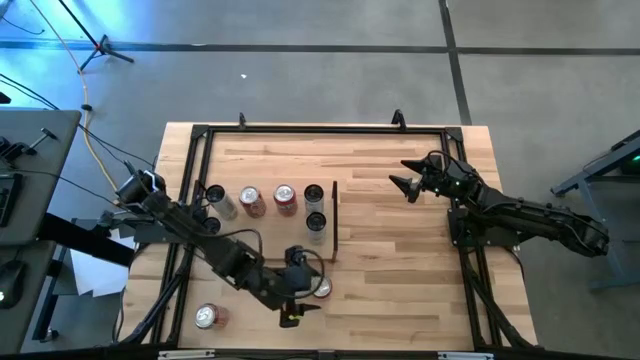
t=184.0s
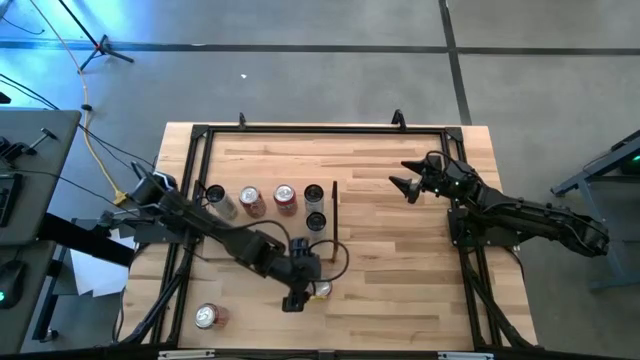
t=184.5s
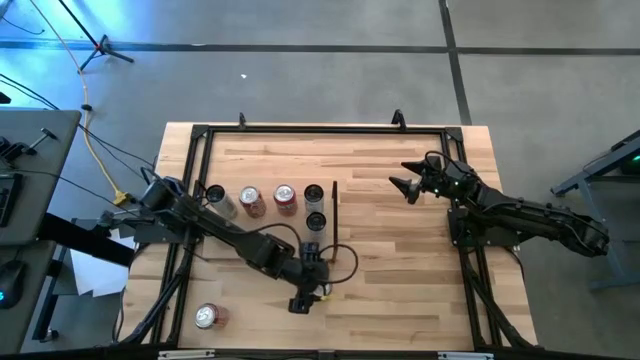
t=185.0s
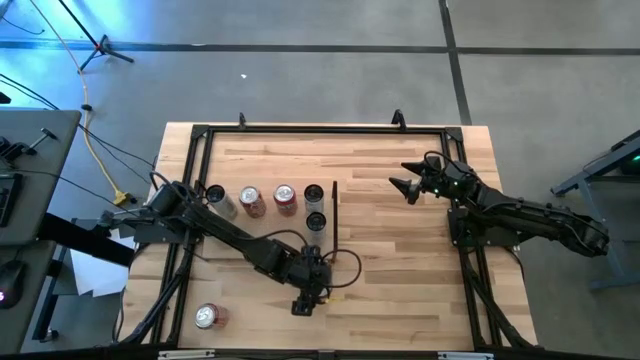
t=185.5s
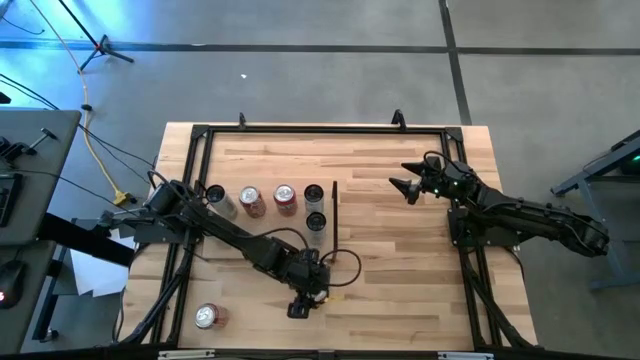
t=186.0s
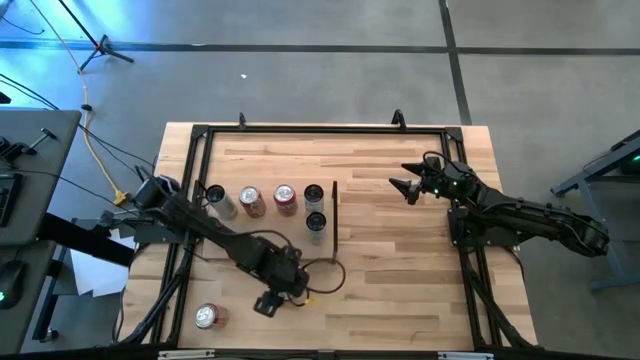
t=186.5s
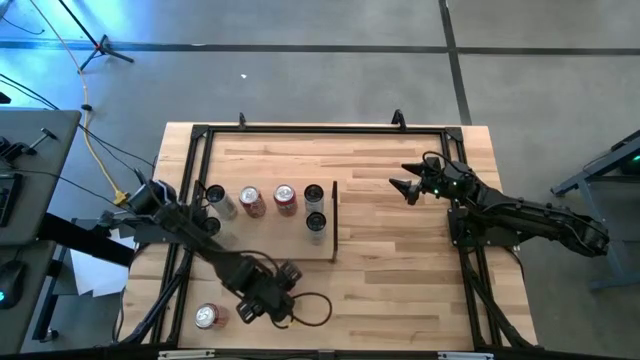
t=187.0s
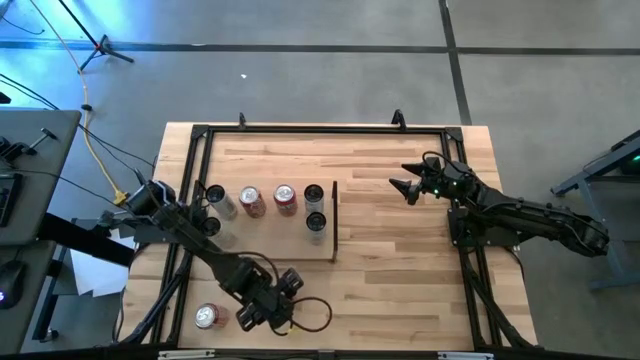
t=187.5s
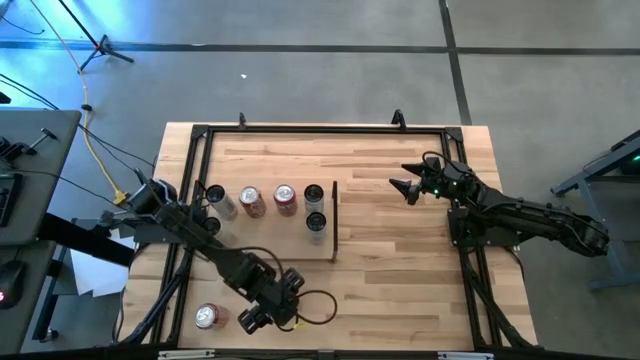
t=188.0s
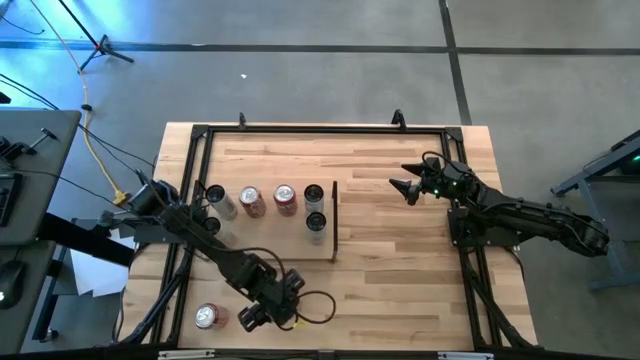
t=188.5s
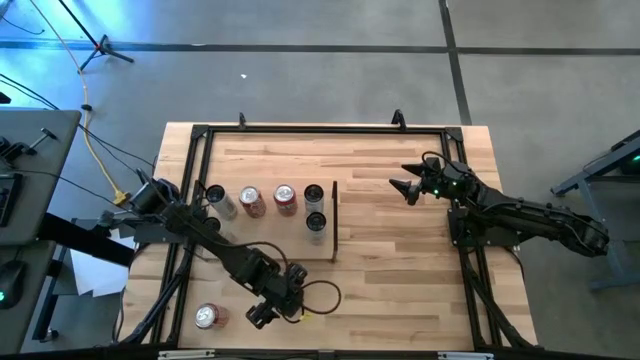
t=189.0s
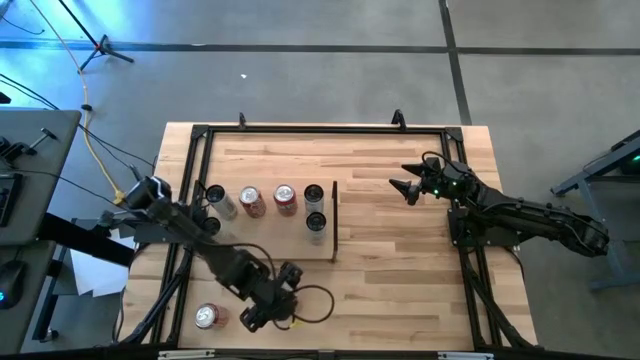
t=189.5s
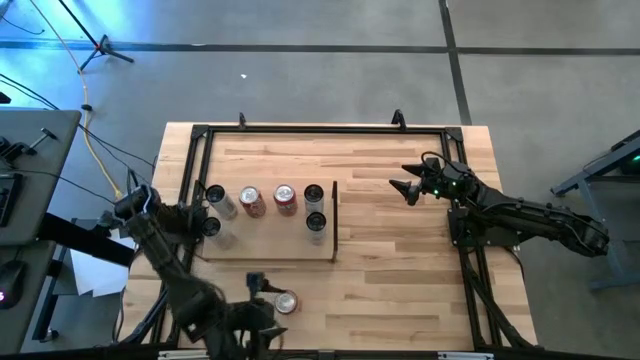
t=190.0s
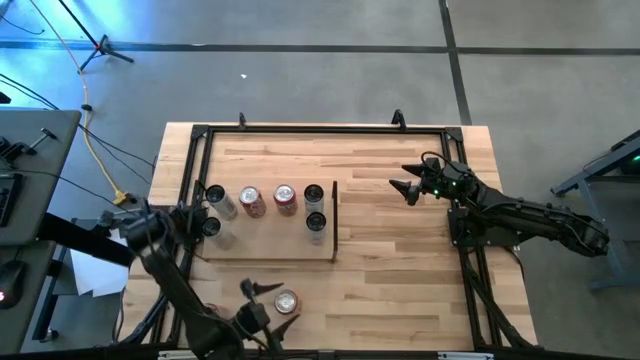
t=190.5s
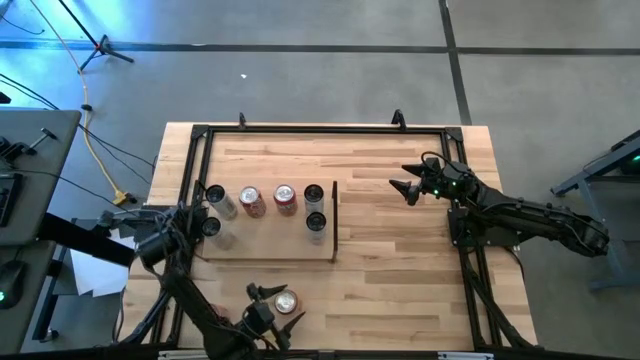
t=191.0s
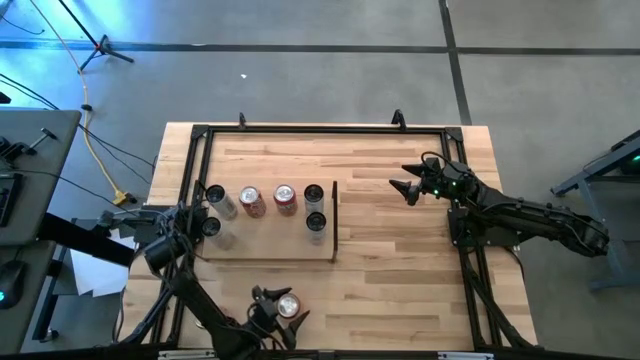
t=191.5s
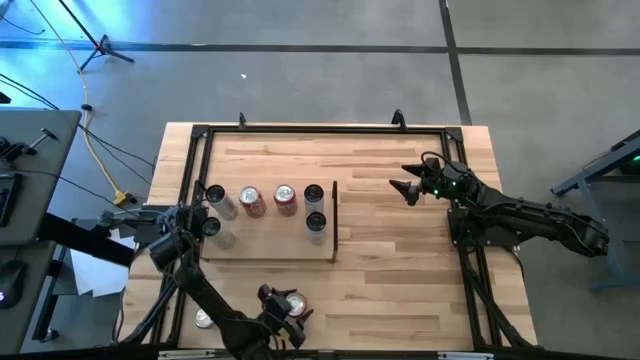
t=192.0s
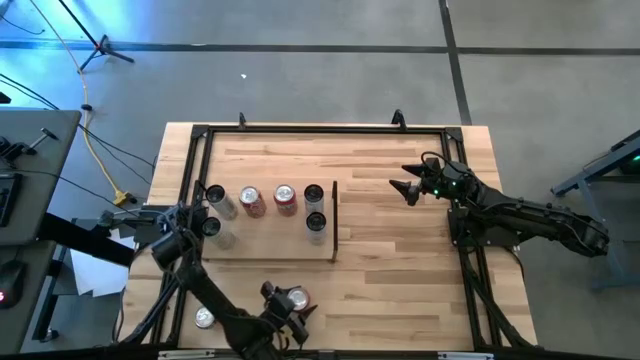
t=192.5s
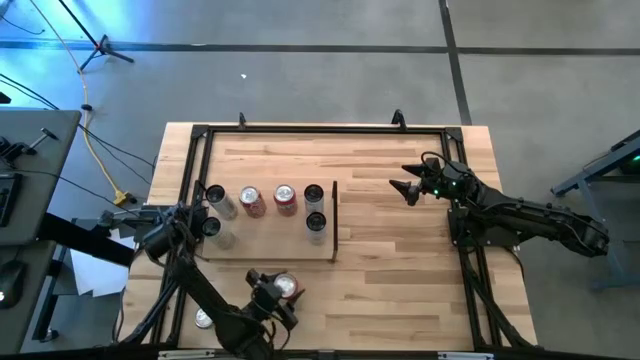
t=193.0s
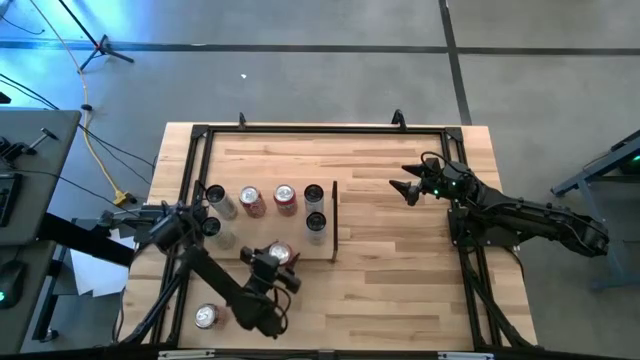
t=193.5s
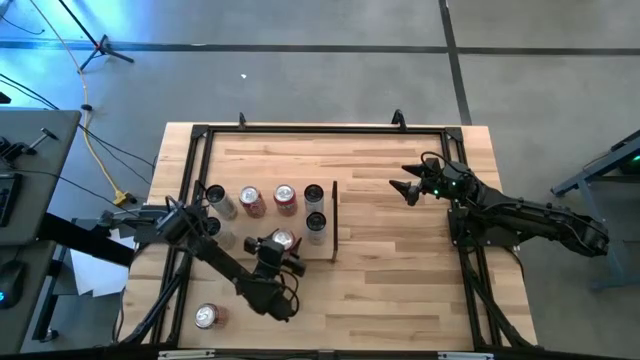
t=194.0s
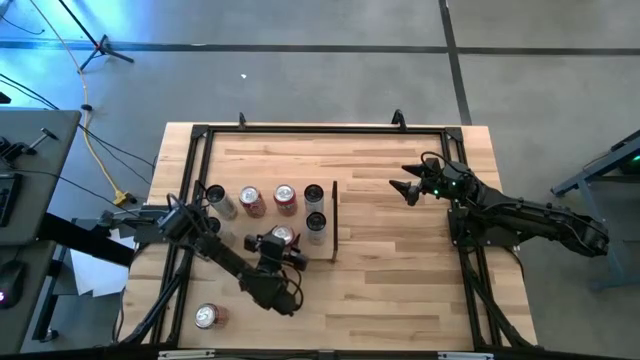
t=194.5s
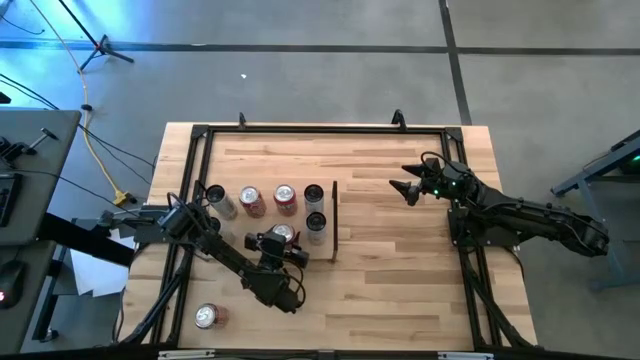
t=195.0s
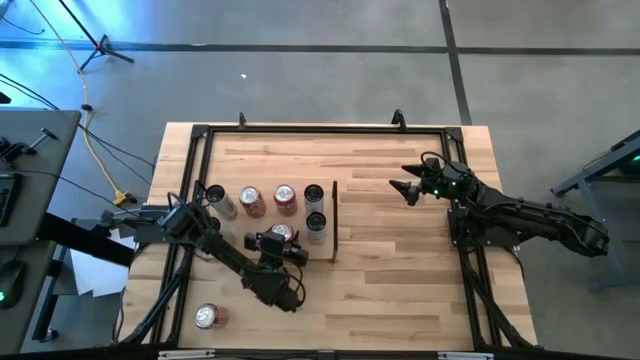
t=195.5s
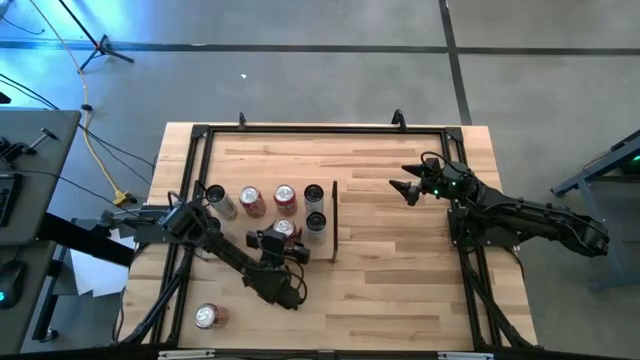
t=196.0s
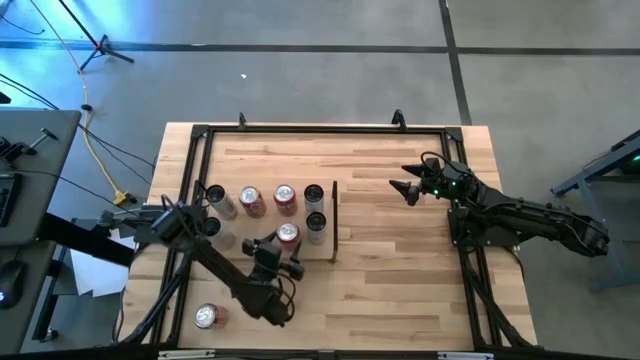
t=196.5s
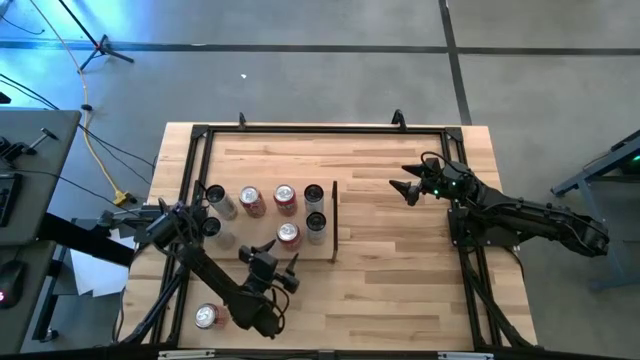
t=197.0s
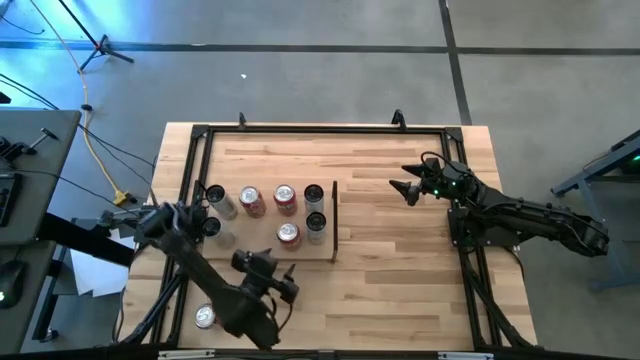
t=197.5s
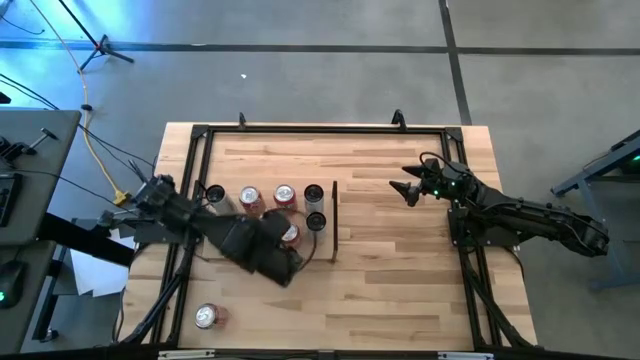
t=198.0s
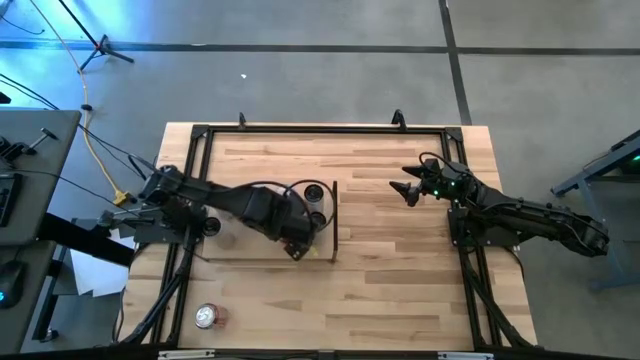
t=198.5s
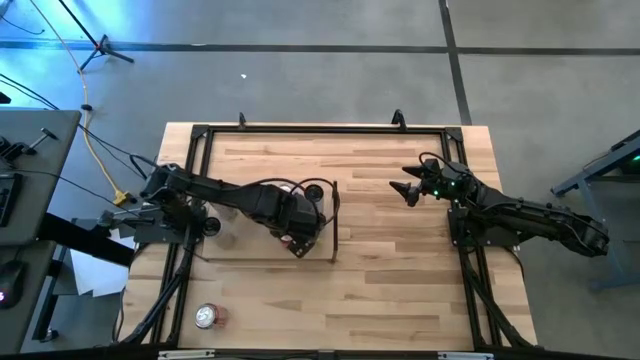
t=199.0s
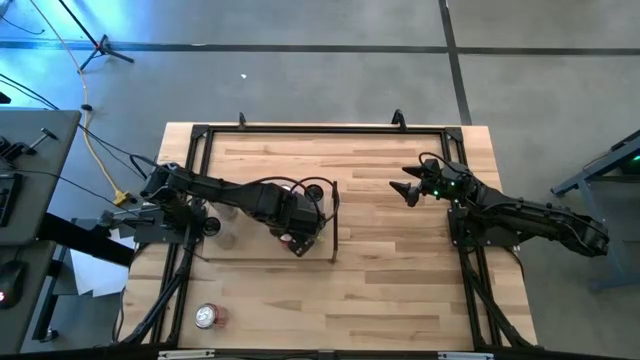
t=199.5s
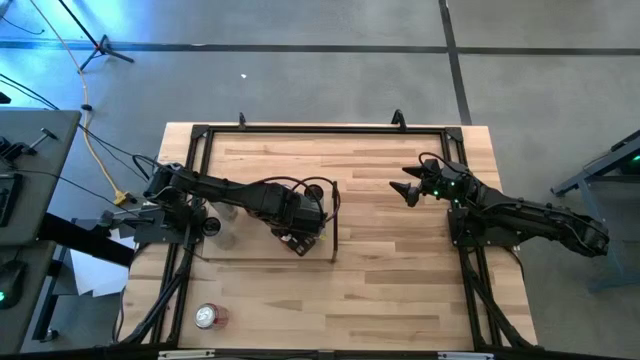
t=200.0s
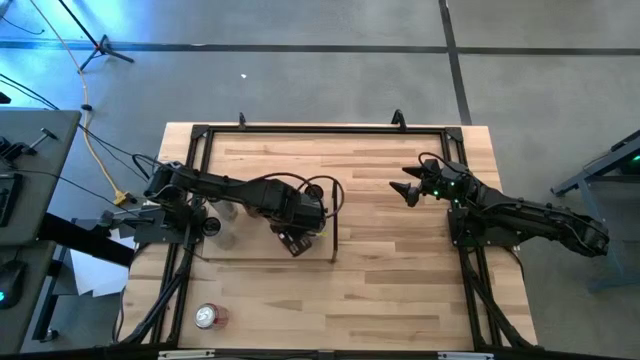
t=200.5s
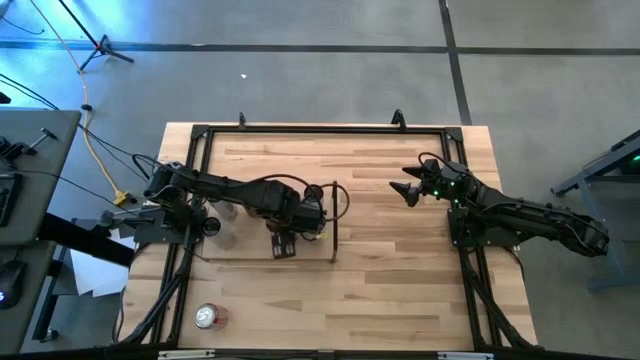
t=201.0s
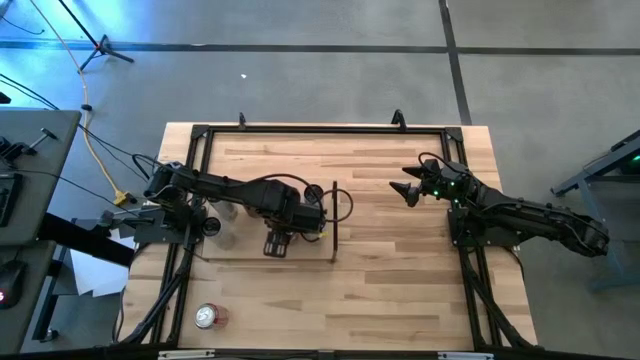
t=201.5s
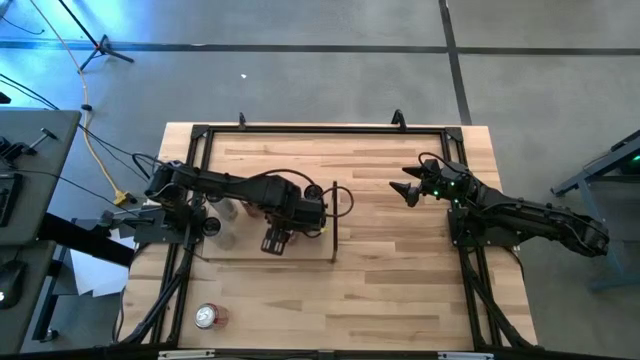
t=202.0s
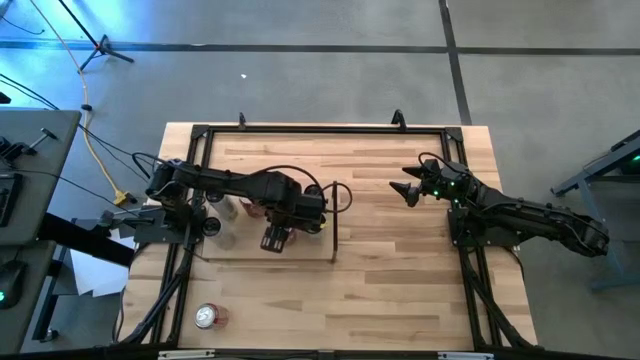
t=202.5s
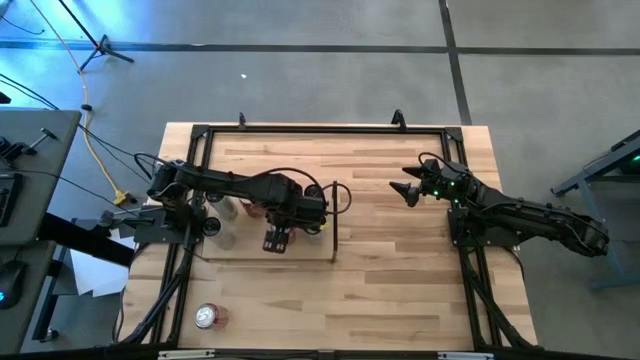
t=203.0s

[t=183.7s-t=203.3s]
Task: Place canned beverage on shelf
Put the red soda can aligned with the other red soda can on the shelf

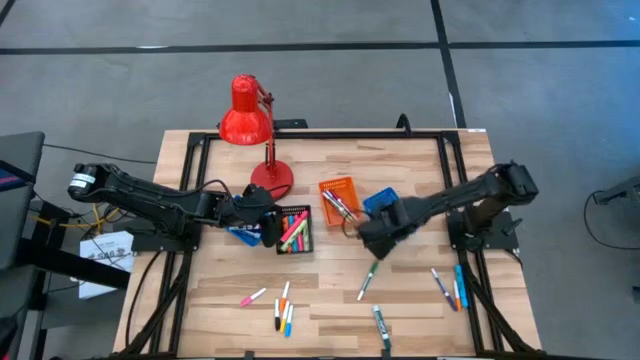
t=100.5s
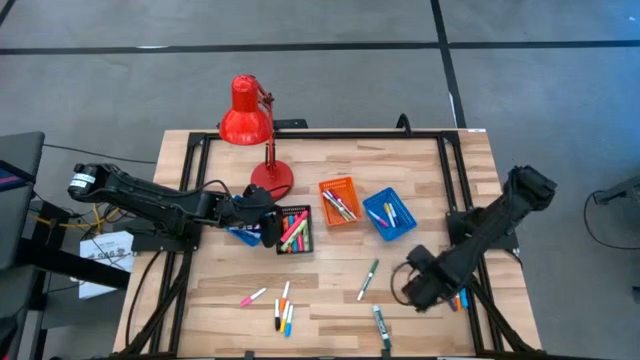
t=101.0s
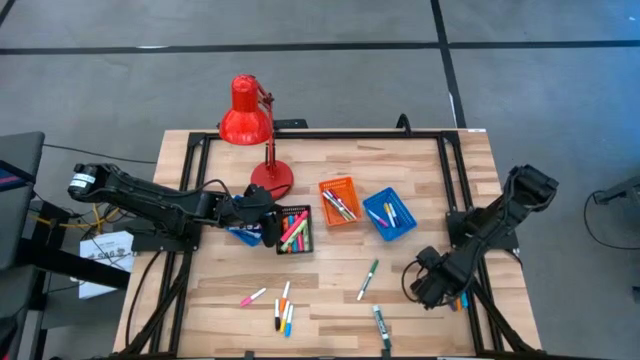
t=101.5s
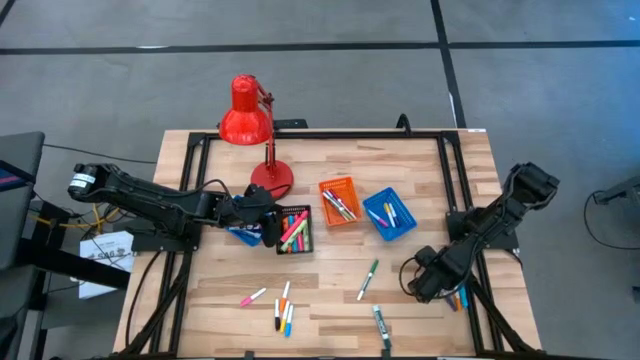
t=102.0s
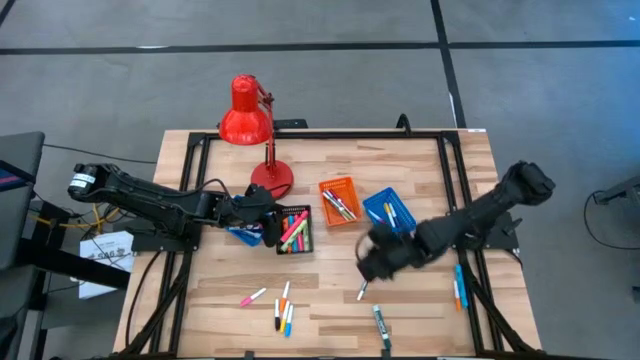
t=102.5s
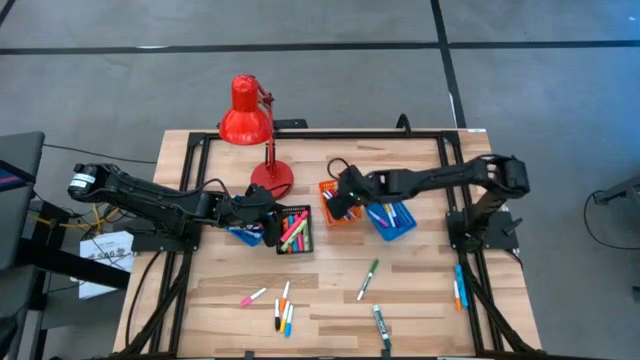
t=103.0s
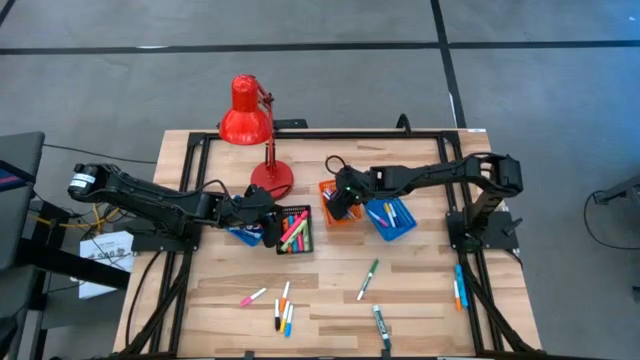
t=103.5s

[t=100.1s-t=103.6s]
Task: Pick & Place Markers
Put the small blue marker pen into the orange basket
